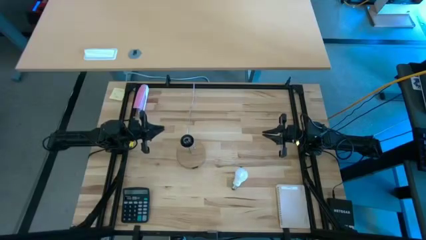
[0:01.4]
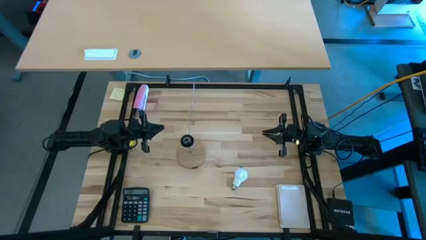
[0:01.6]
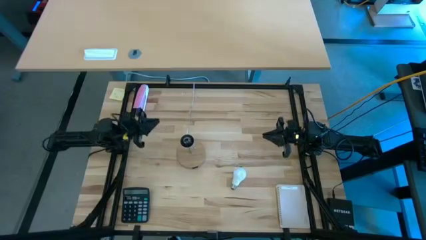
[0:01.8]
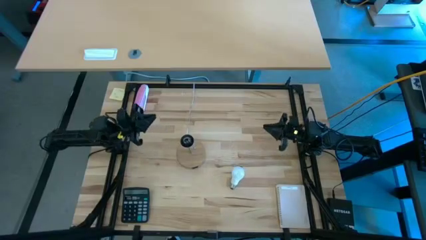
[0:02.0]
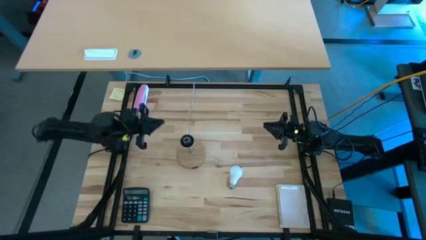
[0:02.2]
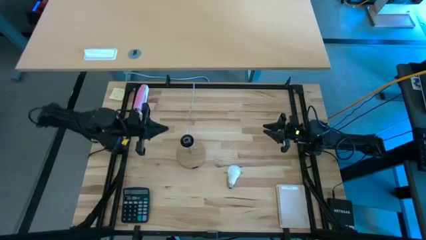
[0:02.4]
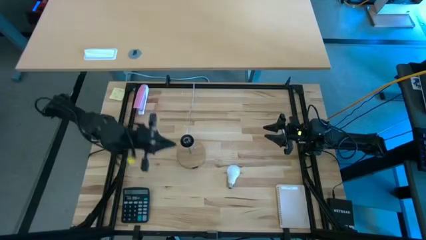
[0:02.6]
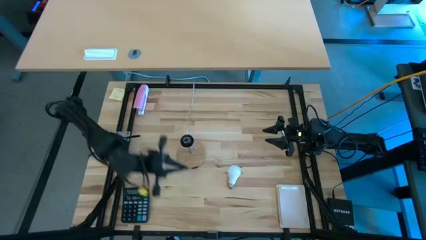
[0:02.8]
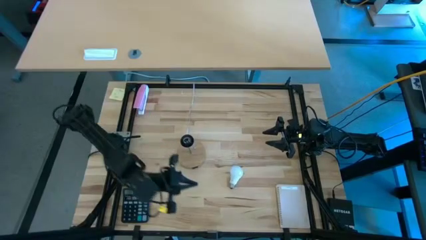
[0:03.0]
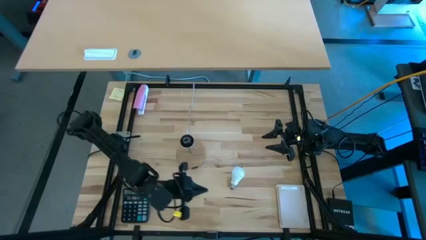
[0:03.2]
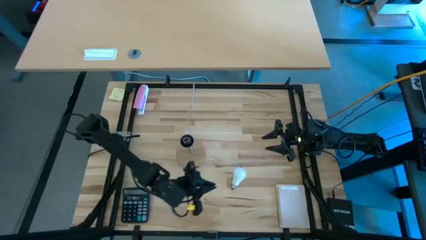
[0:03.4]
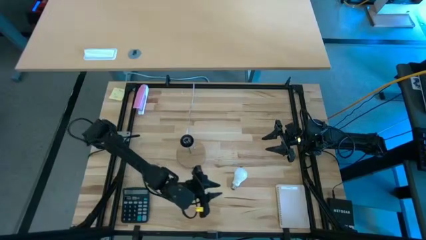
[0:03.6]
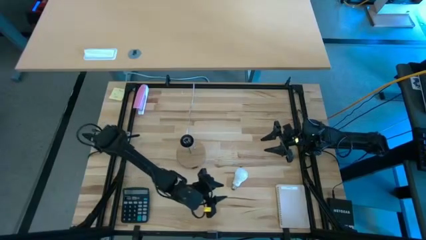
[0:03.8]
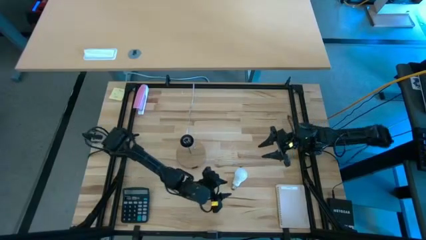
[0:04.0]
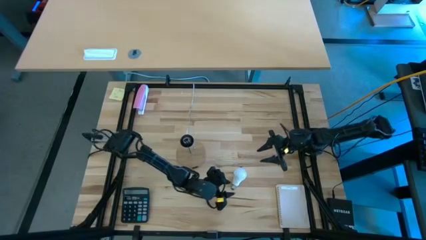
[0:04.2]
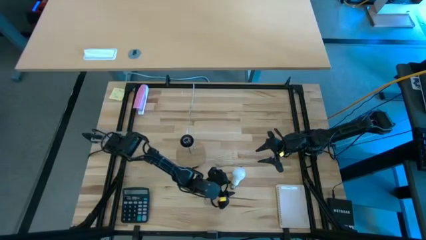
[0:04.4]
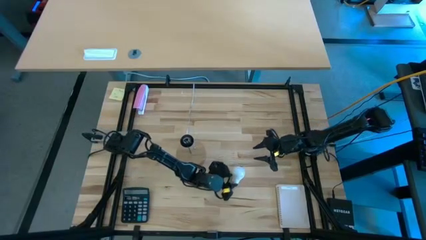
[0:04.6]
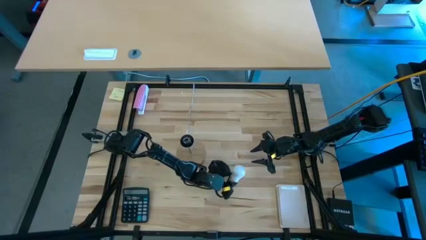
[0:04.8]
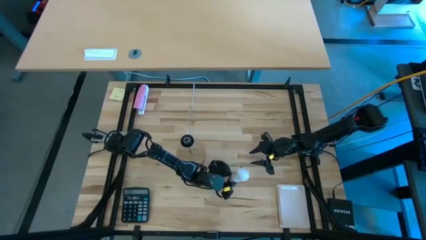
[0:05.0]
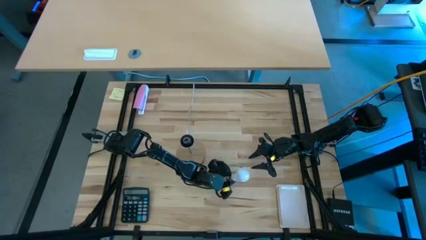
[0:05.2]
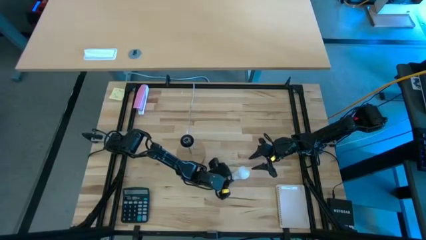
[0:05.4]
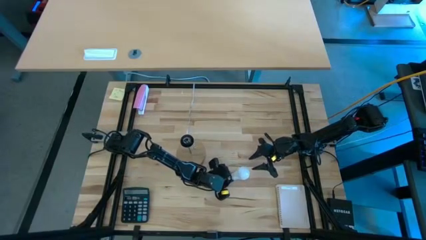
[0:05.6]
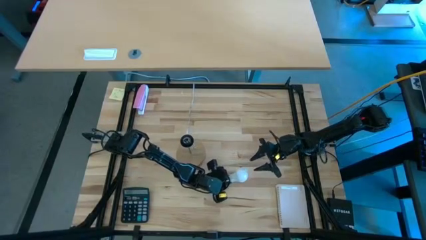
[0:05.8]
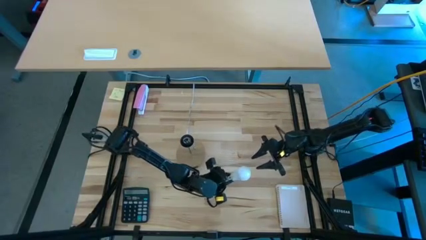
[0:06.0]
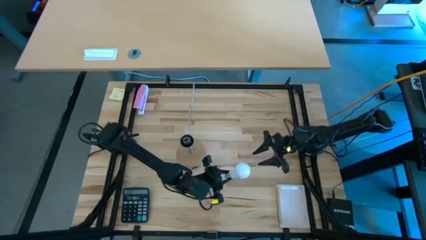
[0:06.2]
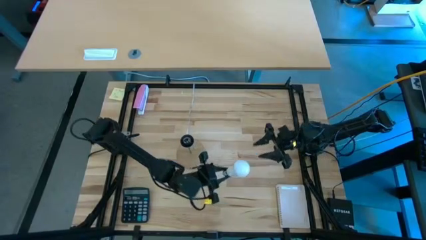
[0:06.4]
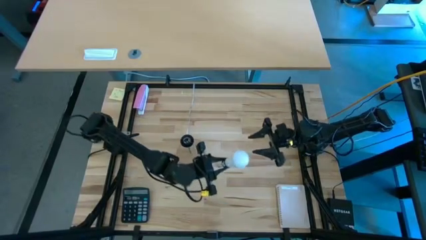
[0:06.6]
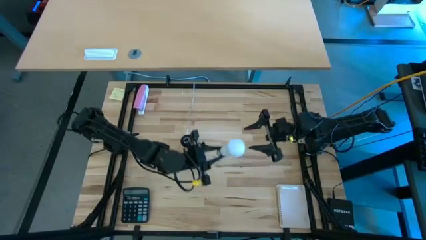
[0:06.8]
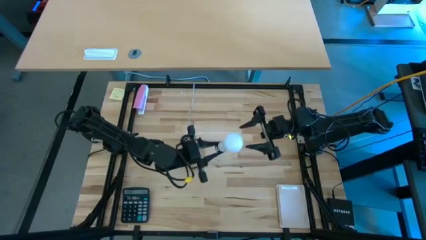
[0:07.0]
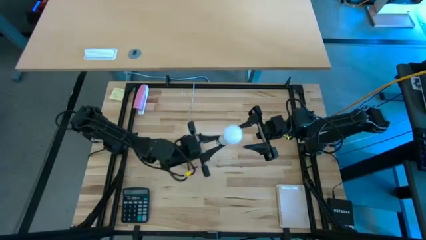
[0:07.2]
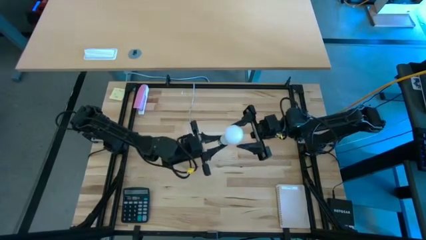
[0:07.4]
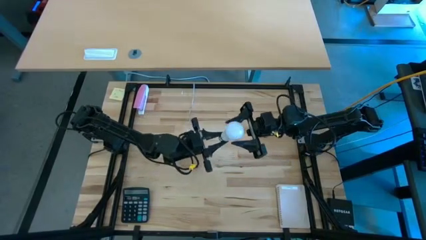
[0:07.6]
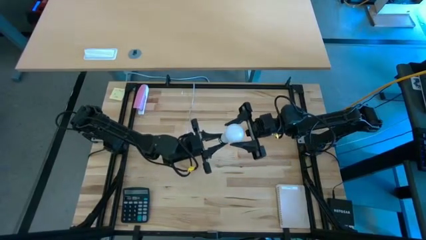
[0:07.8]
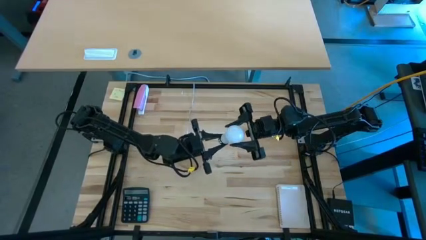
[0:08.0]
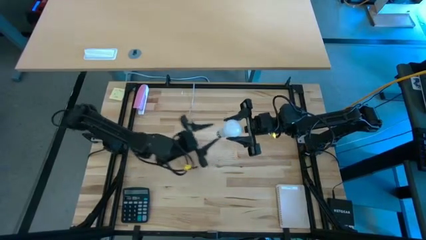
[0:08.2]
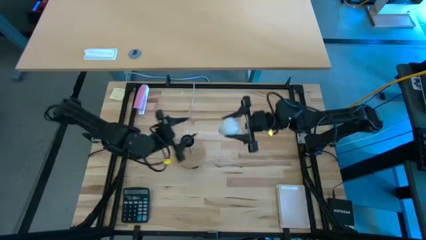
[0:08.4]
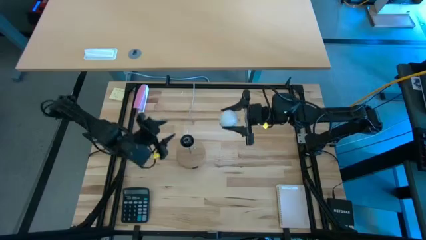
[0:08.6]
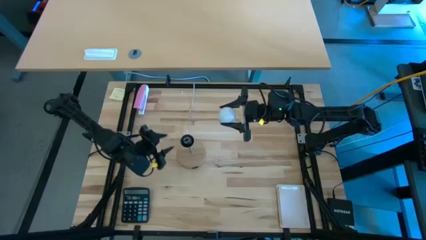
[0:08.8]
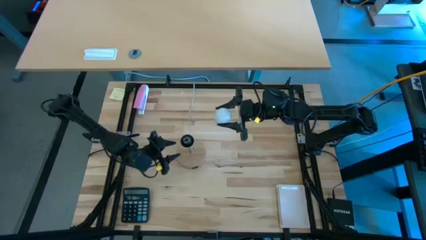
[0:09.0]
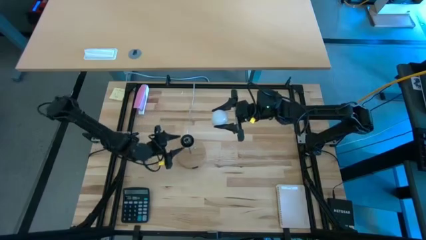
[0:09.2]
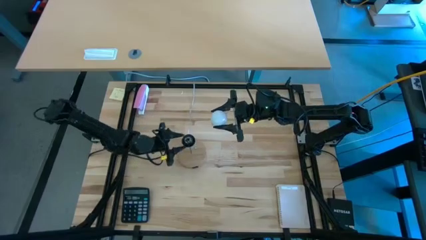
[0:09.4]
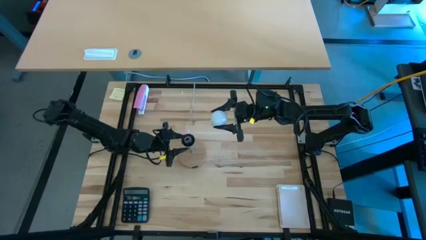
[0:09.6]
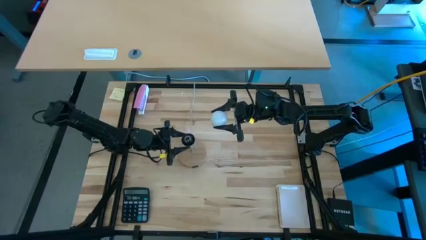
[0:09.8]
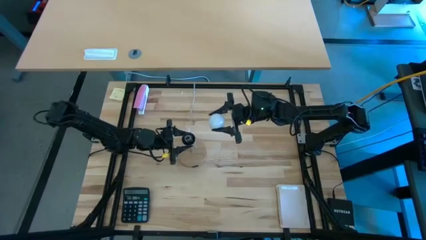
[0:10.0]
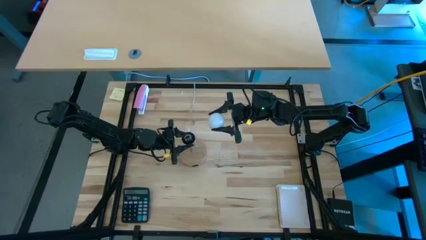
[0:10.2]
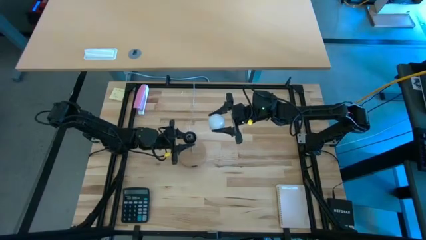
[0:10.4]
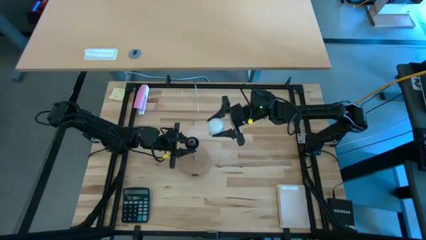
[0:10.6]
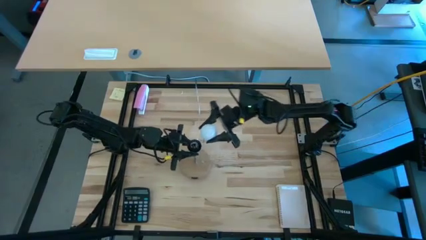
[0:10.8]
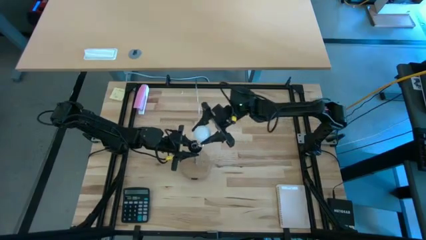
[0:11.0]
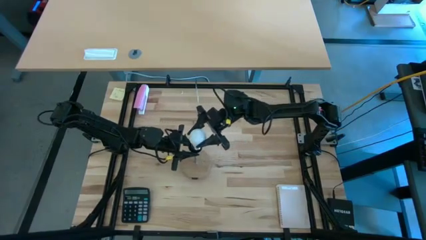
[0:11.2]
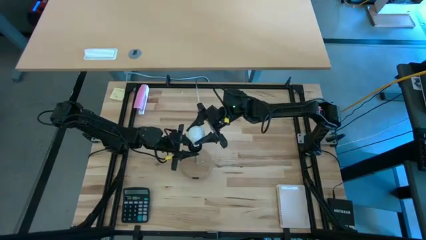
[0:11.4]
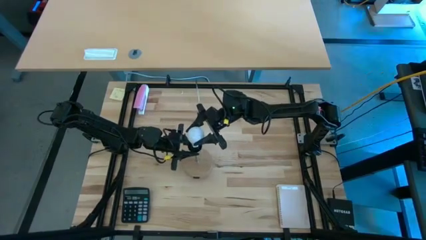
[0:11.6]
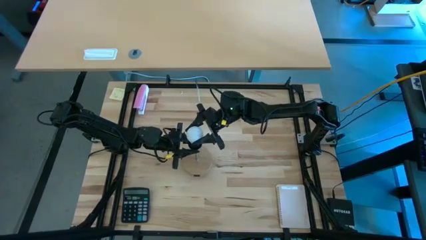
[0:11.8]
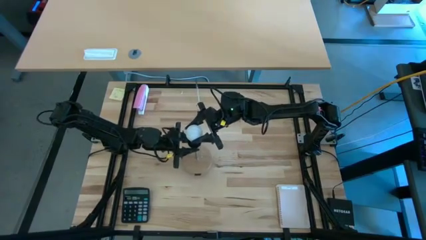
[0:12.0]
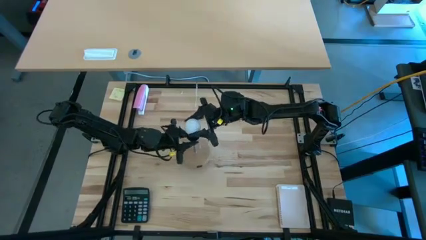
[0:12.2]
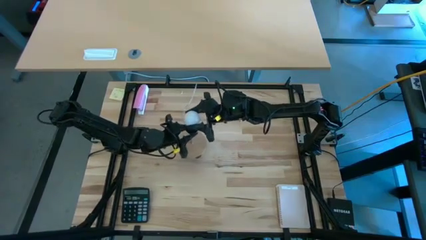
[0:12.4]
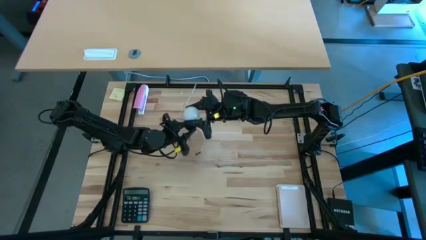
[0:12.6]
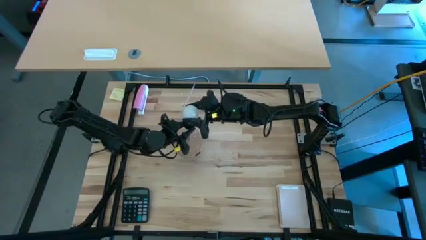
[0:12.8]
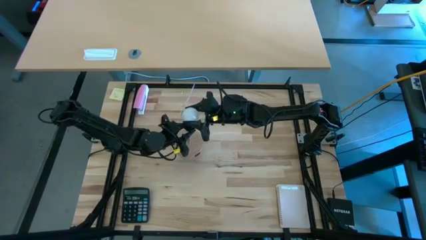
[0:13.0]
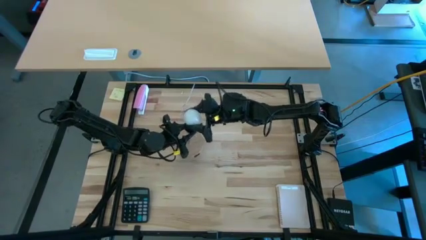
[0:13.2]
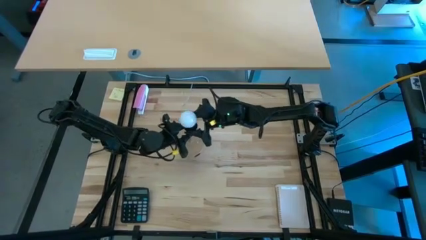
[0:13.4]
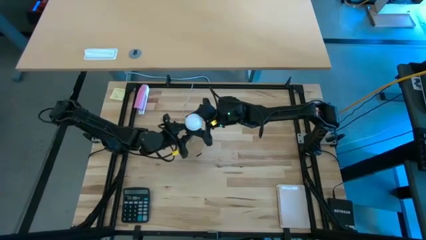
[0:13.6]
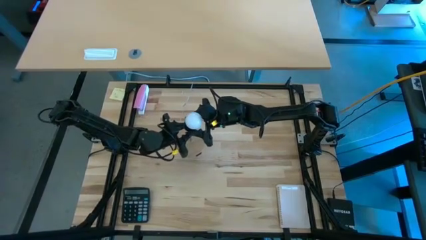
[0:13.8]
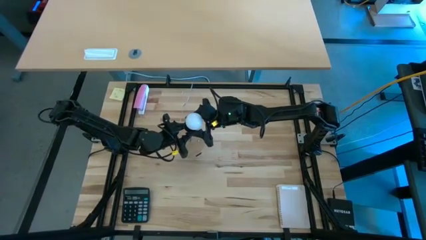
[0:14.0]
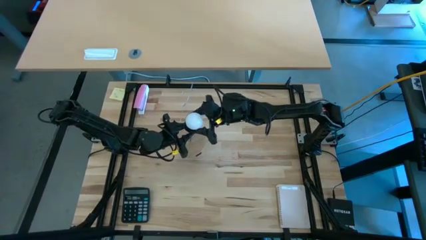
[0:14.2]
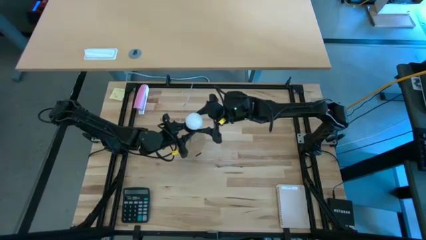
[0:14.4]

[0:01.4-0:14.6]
Task: Screw lightbulb
Insert the lightbulb into the lamp
